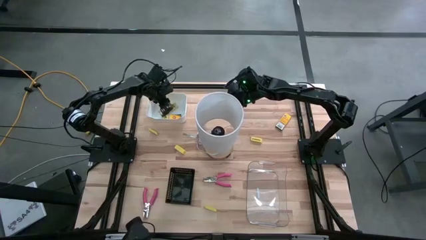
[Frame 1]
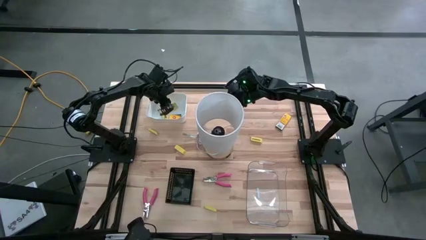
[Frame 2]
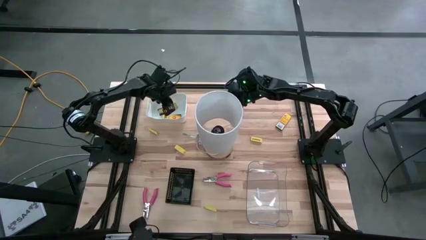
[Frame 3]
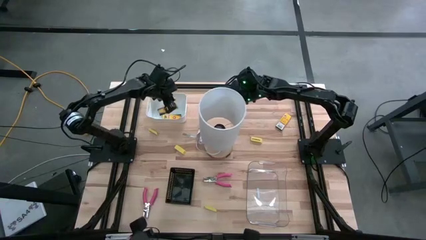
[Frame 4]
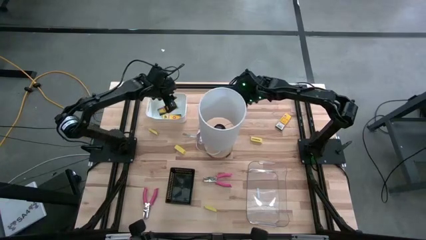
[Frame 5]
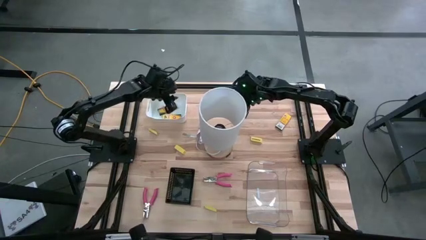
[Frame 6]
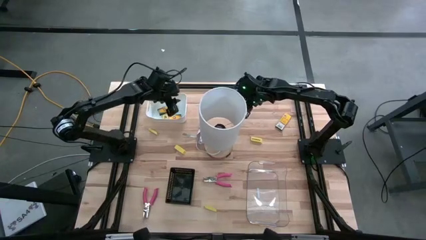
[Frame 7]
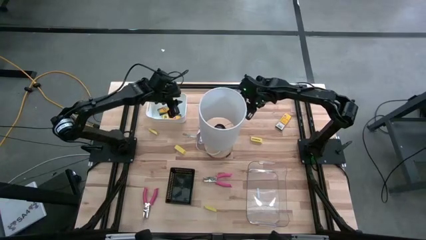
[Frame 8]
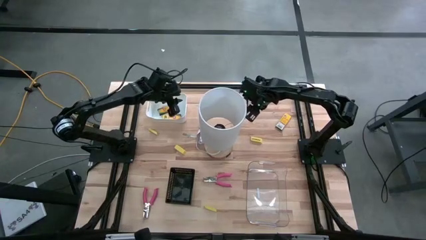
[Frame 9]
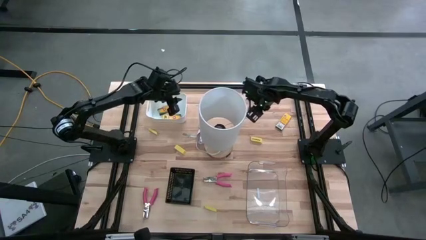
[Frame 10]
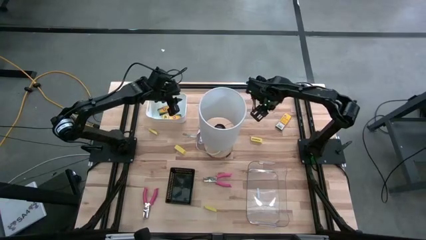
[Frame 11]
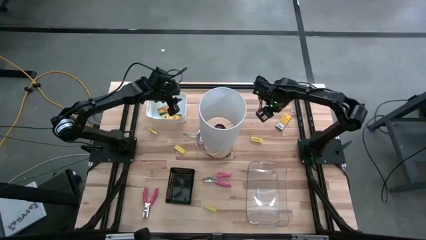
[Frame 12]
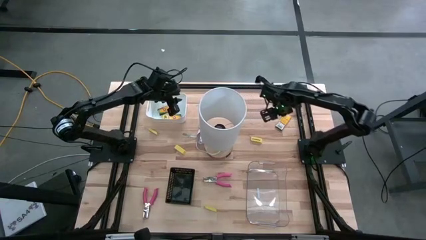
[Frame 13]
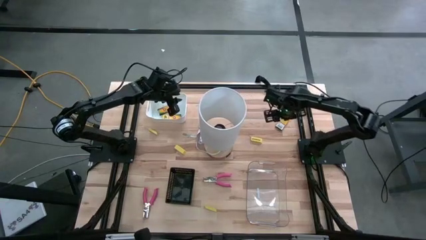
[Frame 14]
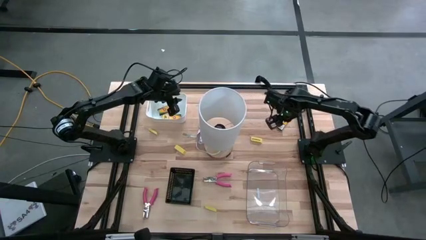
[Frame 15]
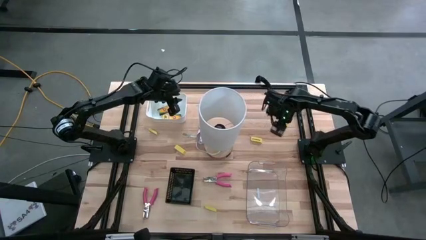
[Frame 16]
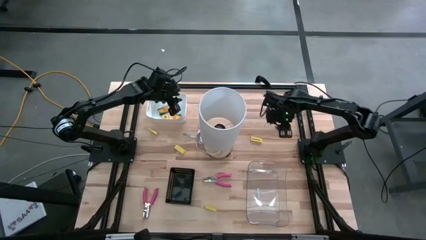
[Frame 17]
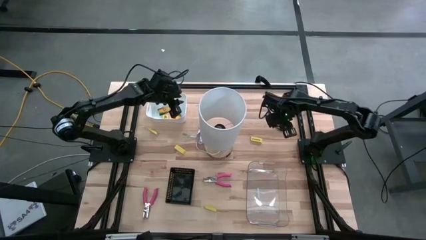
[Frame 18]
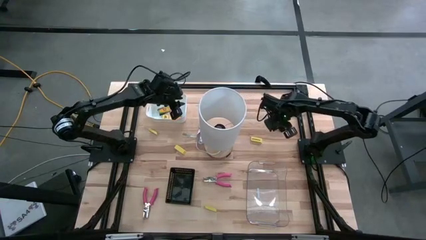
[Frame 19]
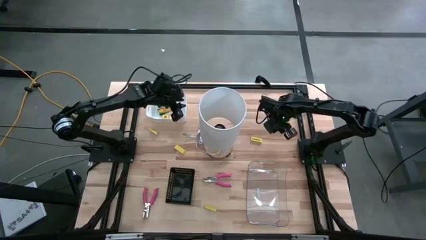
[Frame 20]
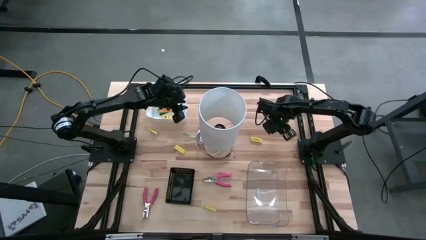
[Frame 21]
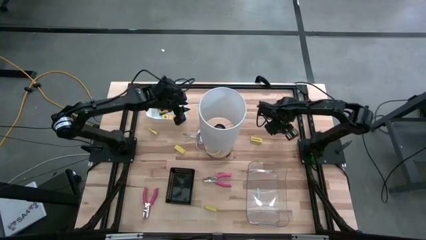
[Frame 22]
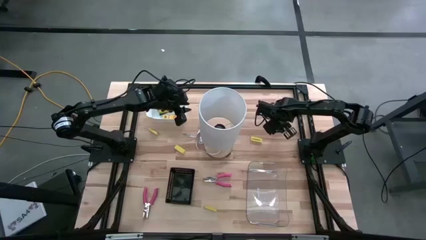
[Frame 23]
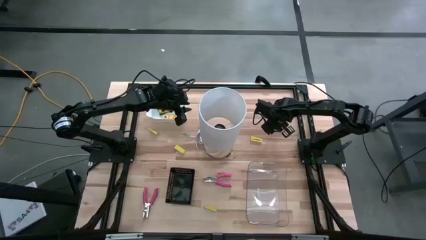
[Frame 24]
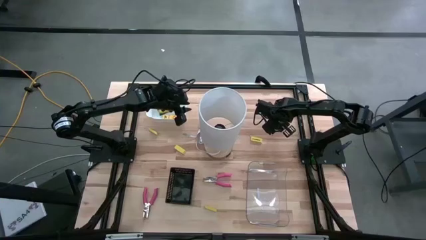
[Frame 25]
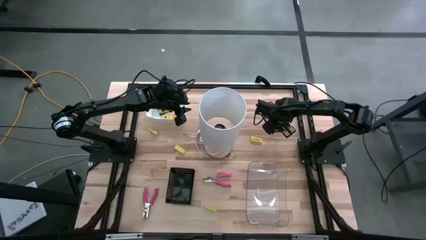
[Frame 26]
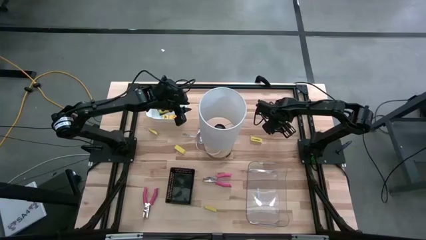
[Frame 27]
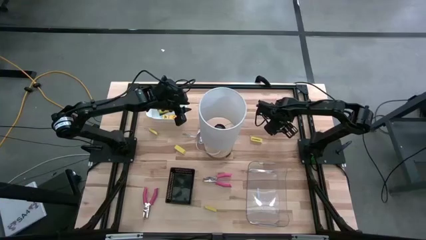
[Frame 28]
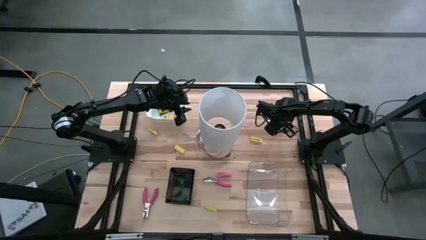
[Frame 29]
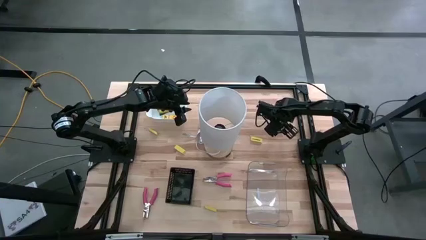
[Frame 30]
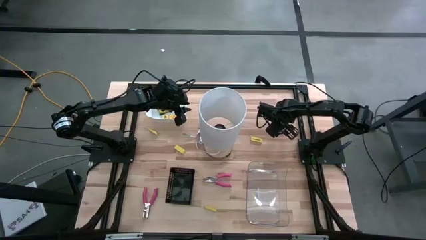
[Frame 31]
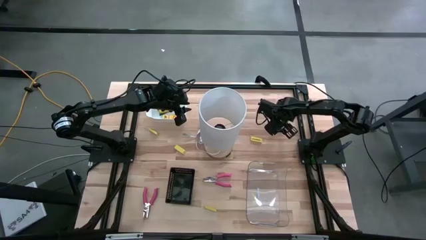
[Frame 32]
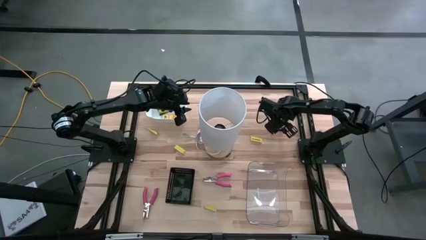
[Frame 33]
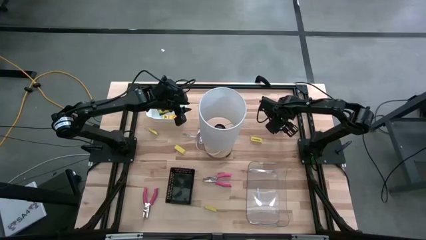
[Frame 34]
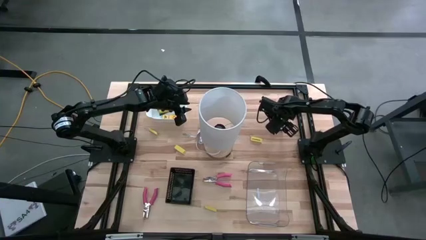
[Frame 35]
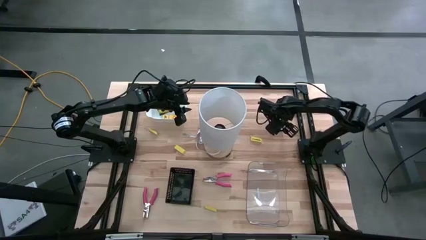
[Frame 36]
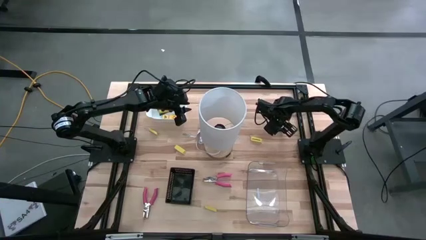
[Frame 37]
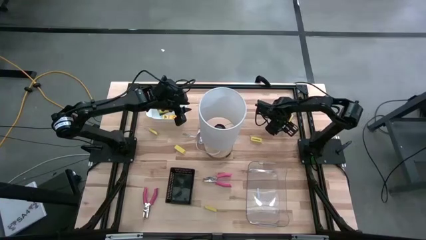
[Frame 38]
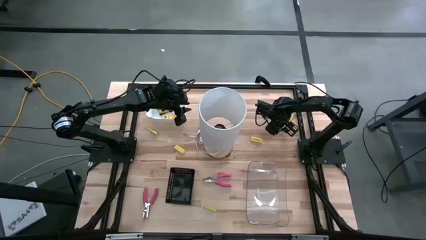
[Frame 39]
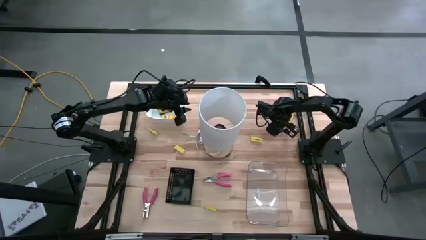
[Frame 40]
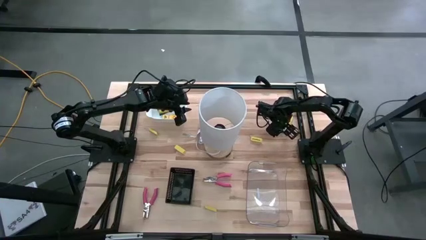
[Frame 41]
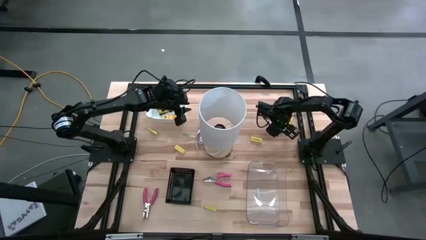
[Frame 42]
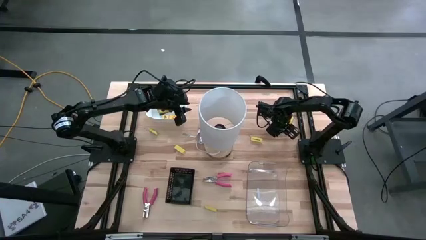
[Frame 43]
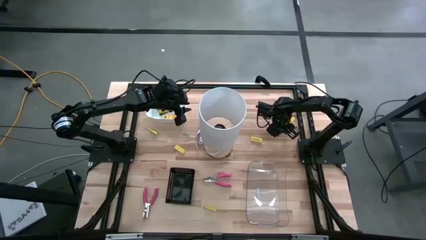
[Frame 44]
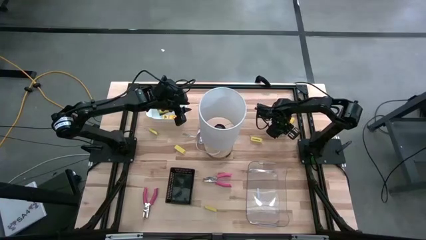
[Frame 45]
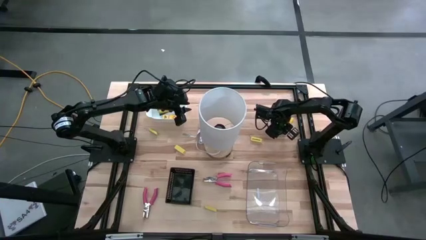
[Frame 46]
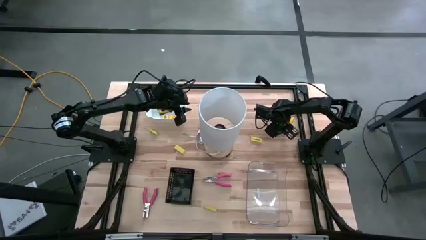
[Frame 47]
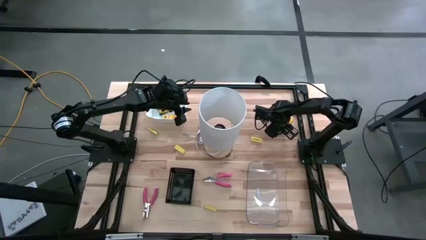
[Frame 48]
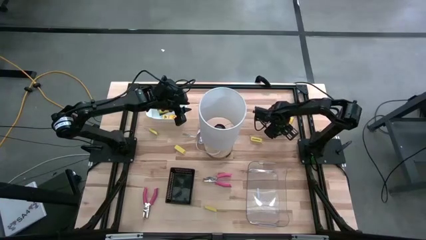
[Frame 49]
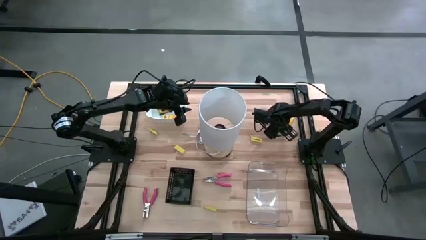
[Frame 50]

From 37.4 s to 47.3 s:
Task: Pick & Place School Supplies
Put the crayon box into the white bin

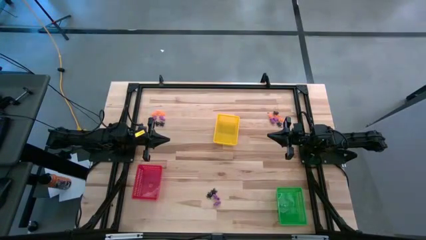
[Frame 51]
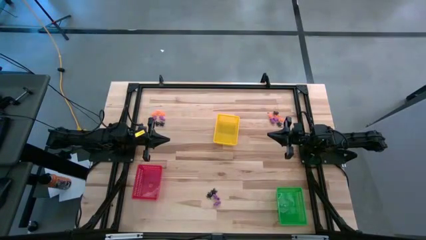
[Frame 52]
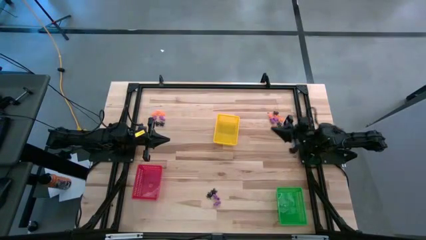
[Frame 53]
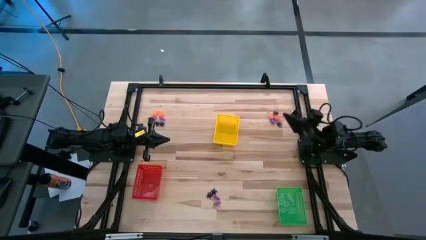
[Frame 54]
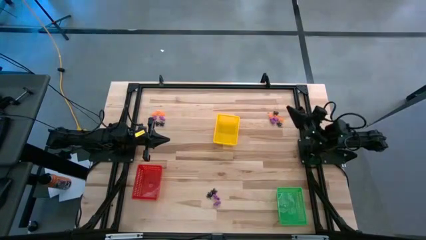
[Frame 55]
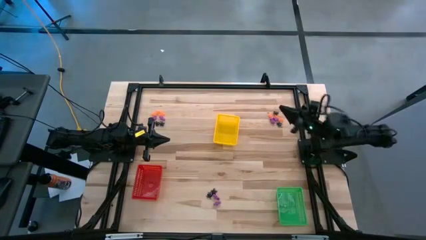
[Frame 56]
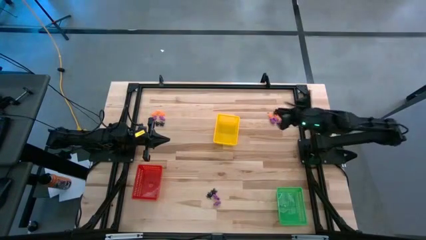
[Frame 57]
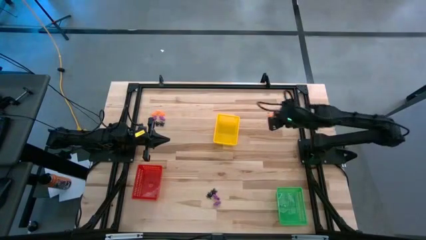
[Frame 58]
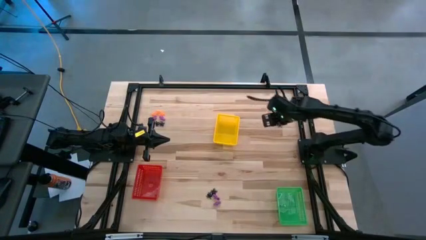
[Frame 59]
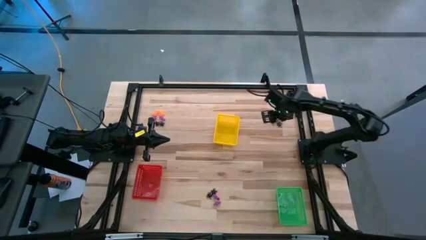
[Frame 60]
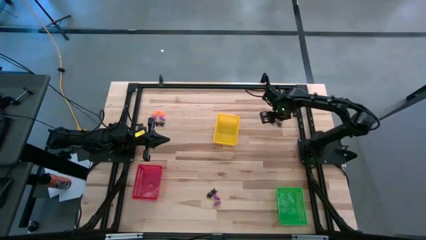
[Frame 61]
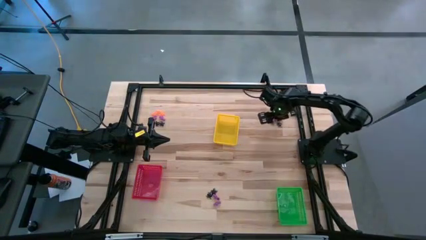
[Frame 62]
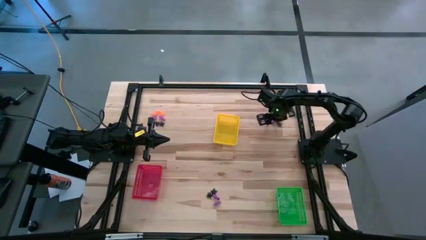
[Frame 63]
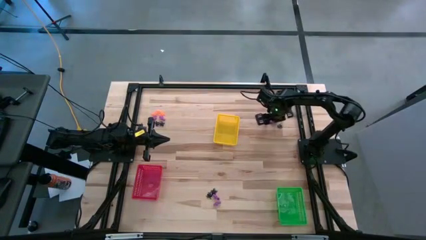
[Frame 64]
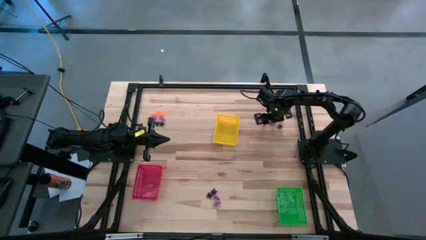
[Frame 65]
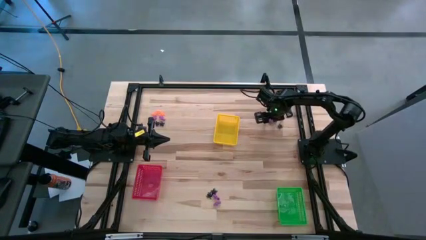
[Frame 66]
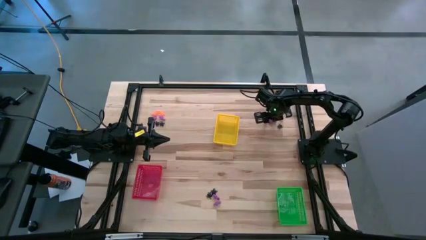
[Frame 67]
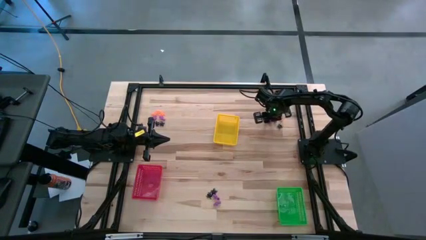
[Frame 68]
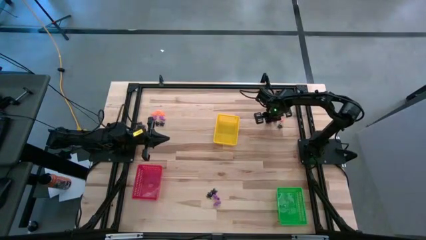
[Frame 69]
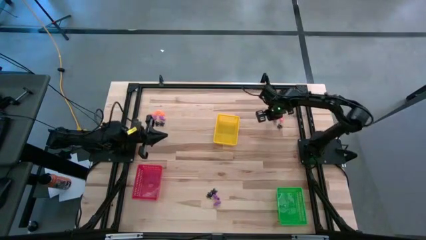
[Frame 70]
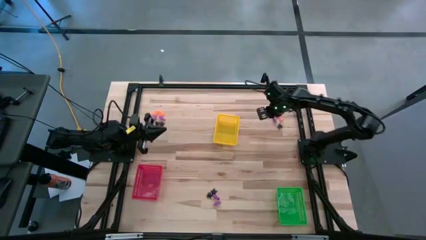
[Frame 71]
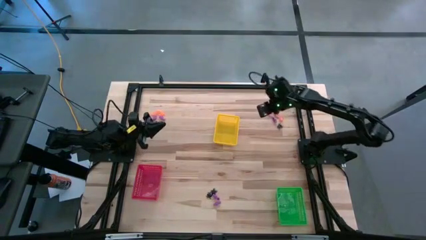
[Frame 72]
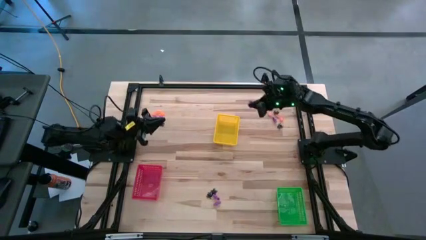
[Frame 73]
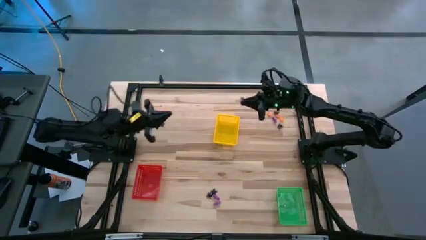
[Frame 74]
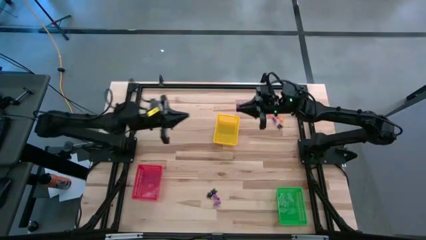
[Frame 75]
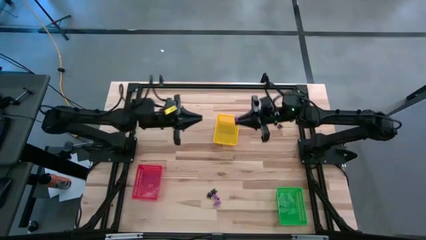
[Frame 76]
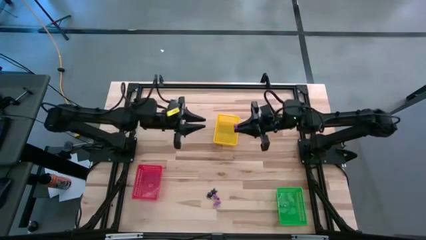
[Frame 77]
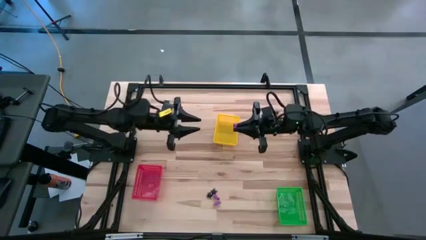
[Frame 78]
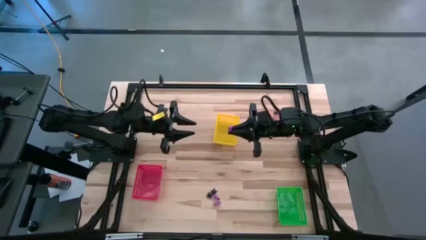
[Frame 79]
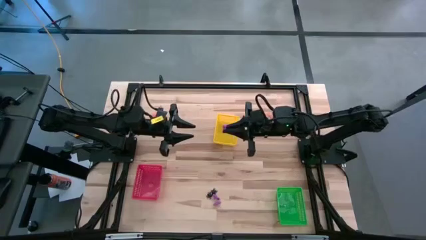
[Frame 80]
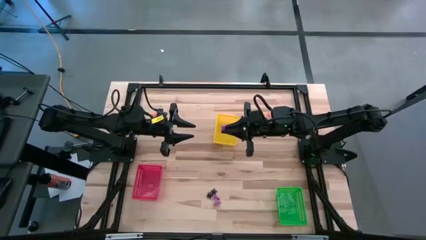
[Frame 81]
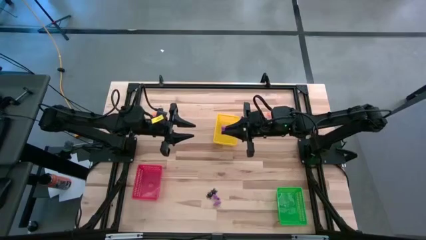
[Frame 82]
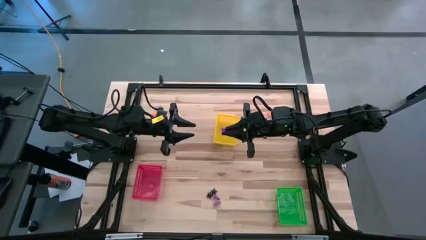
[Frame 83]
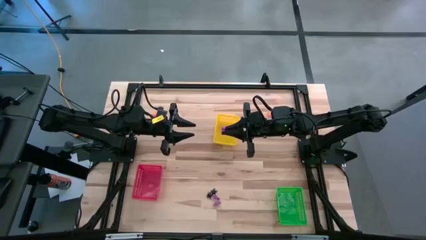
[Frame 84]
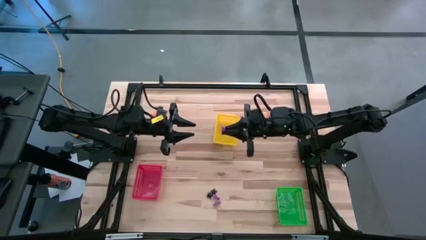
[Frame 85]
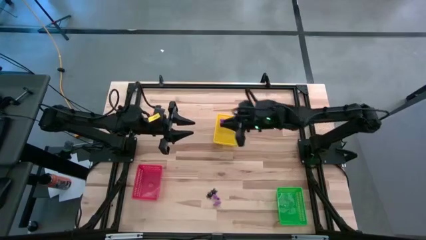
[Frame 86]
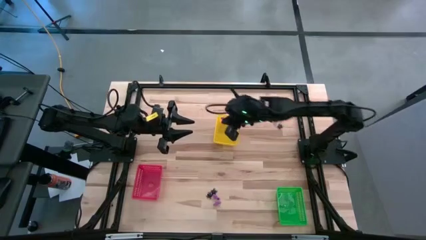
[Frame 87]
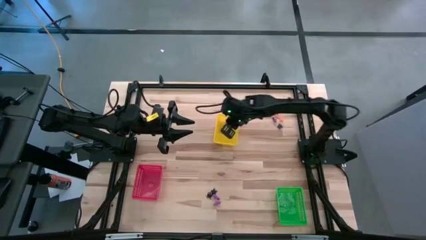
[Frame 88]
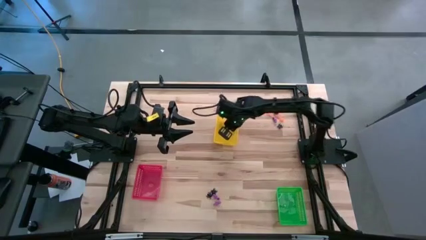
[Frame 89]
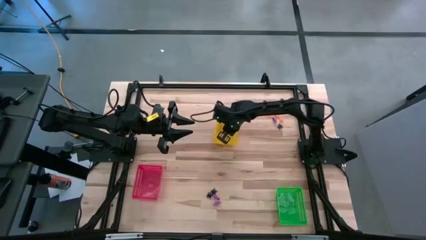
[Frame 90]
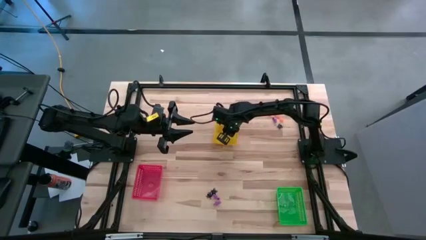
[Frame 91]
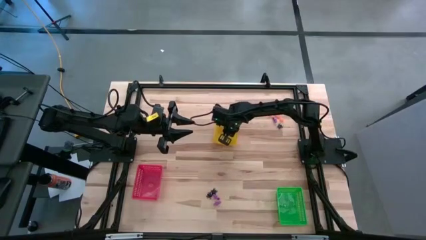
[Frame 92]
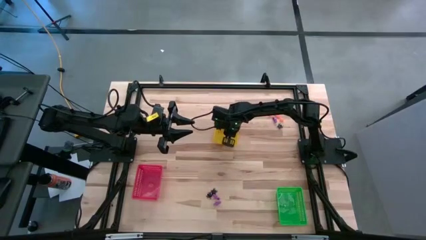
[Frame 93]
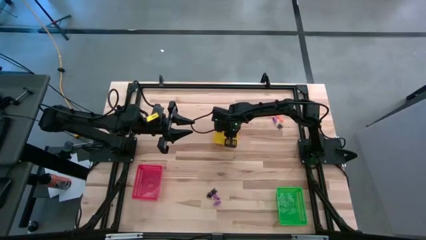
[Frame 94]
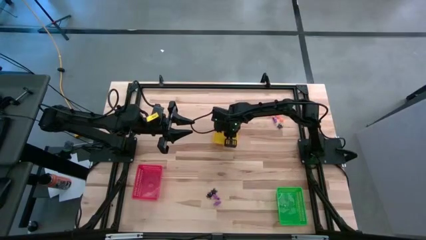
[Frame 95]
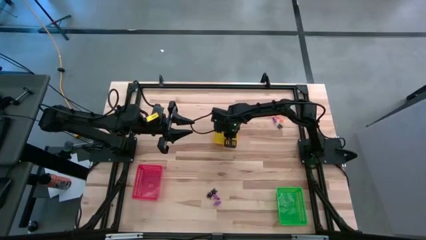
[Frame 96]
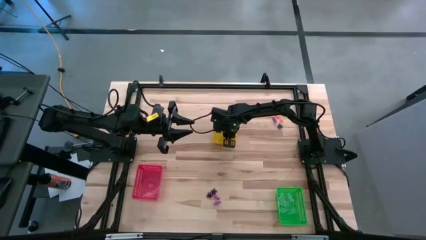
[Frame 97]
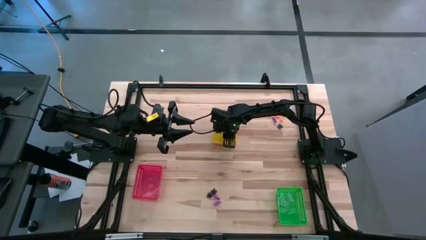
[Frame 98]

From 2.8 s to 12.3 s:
Task: Sort Halloween decoration
Put the skeleton toy into the yellow bin
